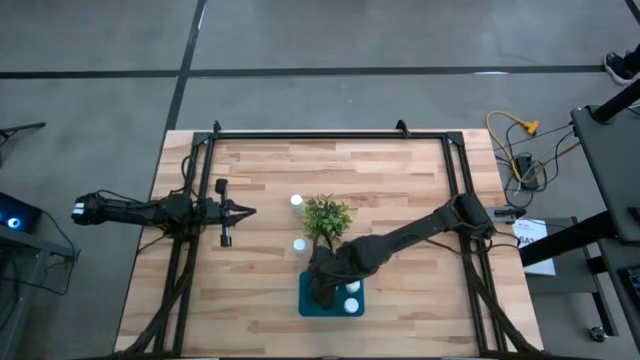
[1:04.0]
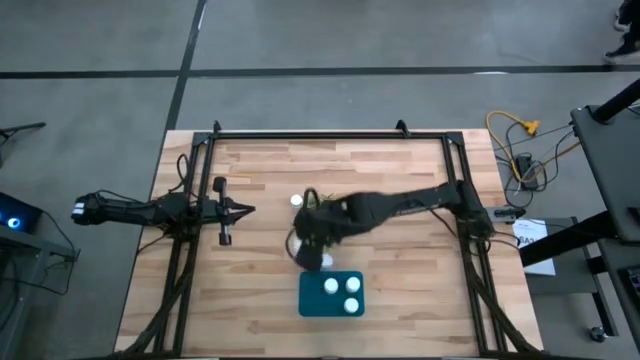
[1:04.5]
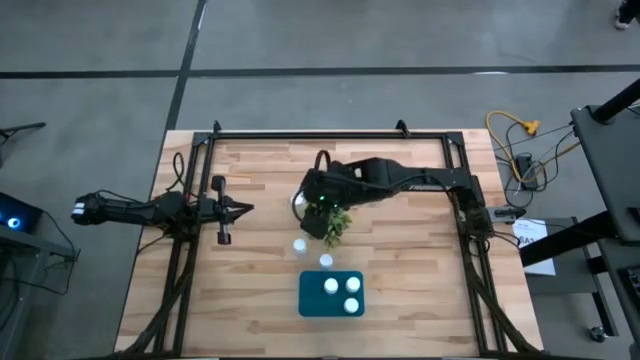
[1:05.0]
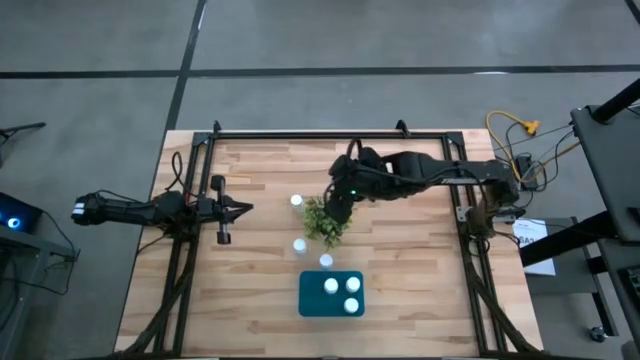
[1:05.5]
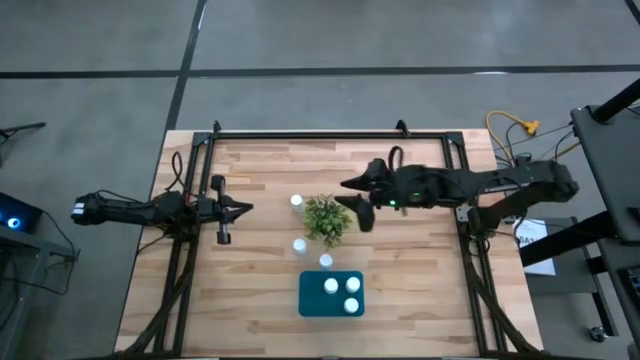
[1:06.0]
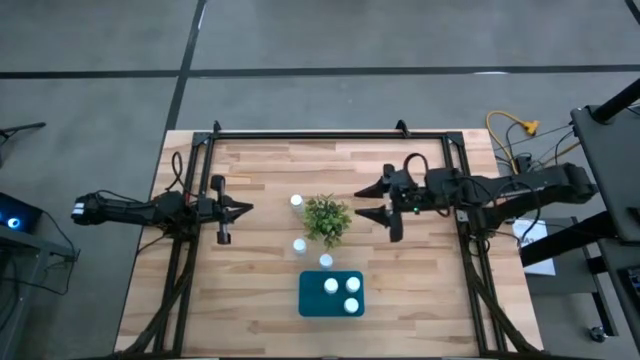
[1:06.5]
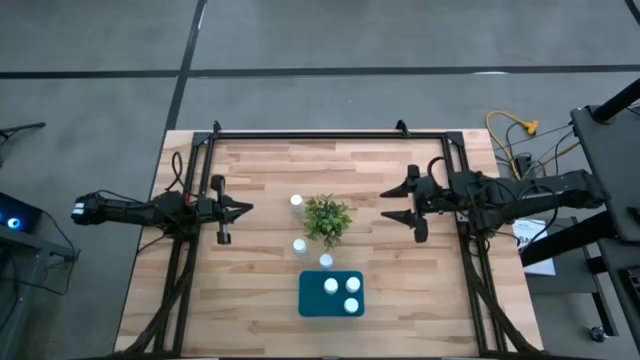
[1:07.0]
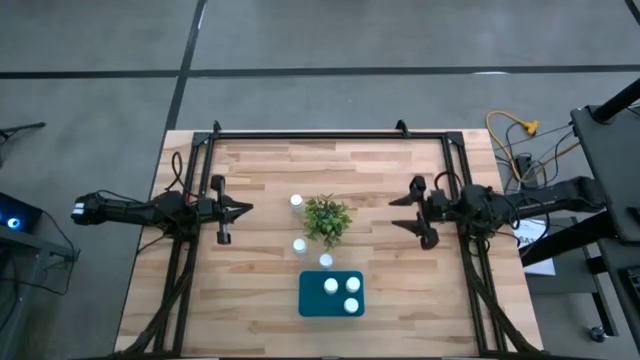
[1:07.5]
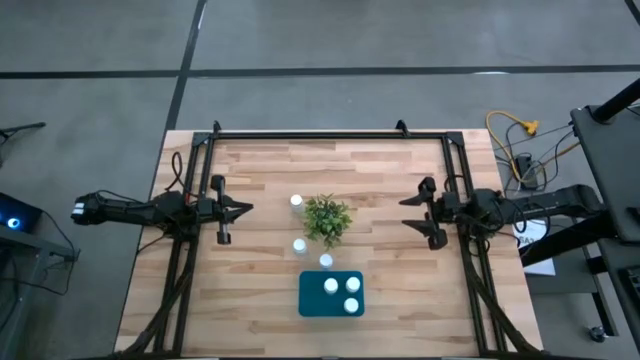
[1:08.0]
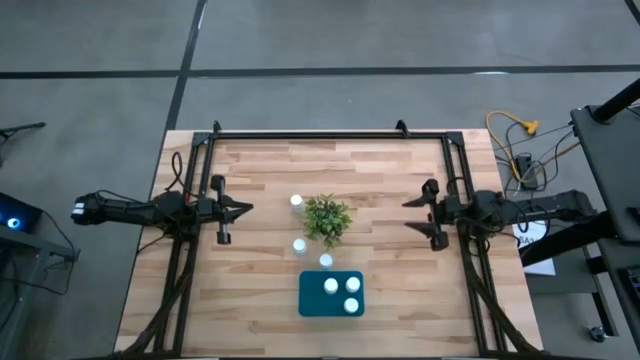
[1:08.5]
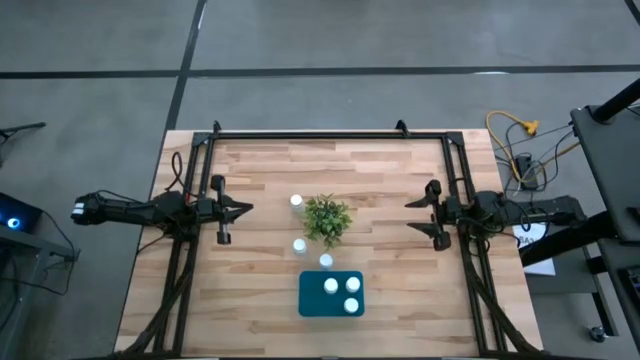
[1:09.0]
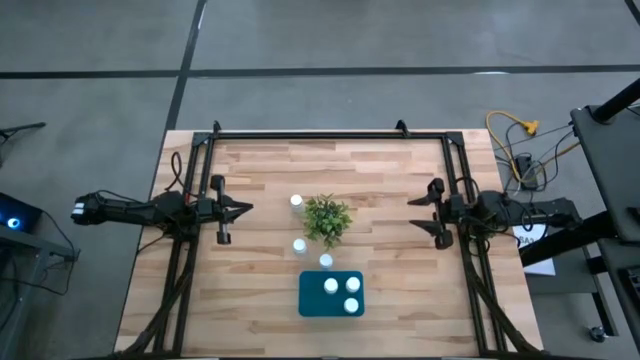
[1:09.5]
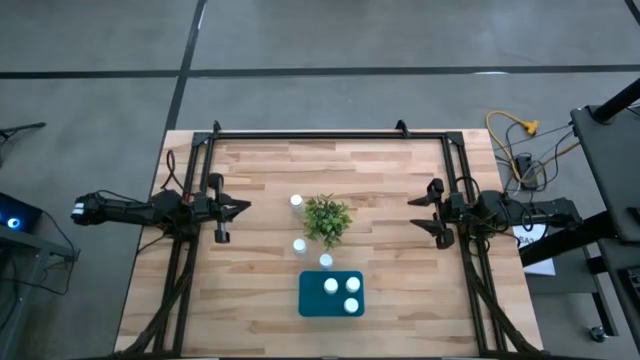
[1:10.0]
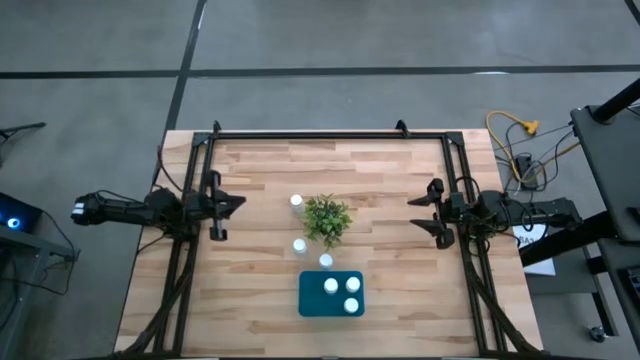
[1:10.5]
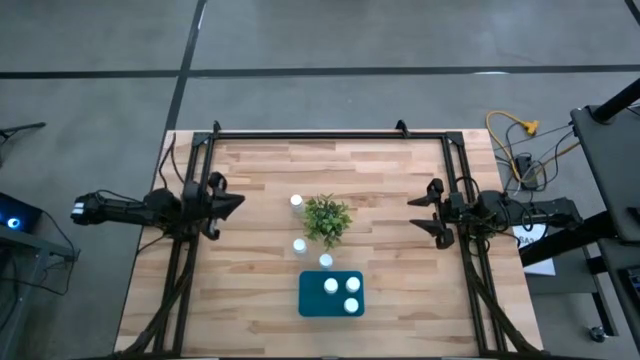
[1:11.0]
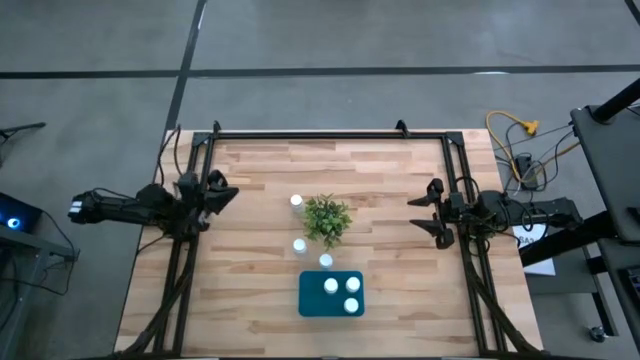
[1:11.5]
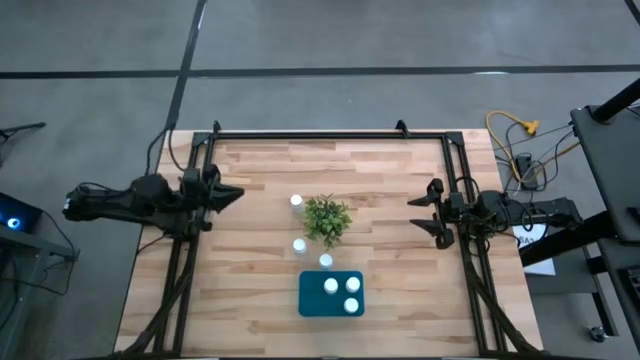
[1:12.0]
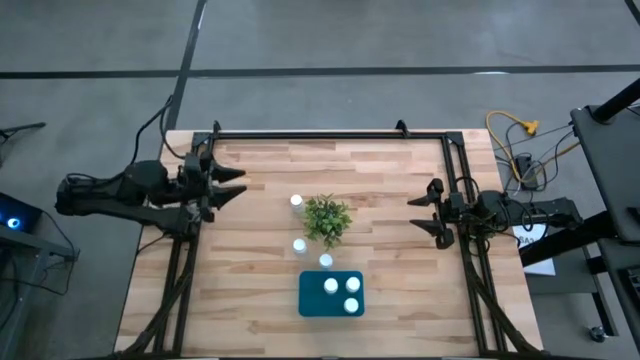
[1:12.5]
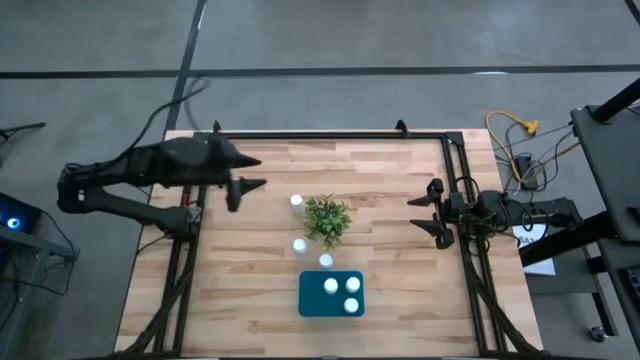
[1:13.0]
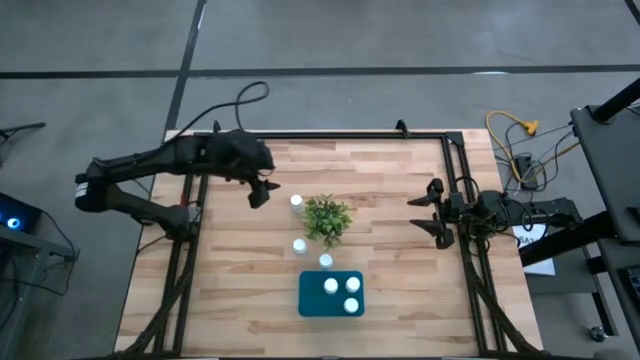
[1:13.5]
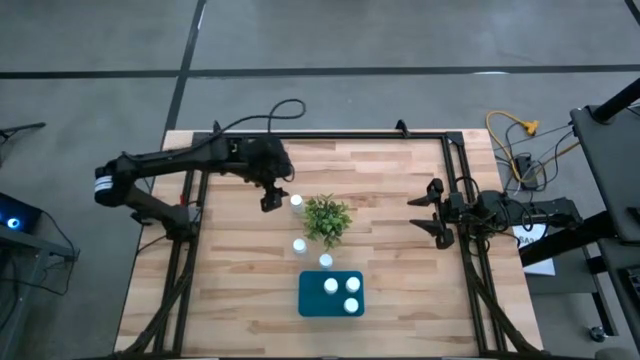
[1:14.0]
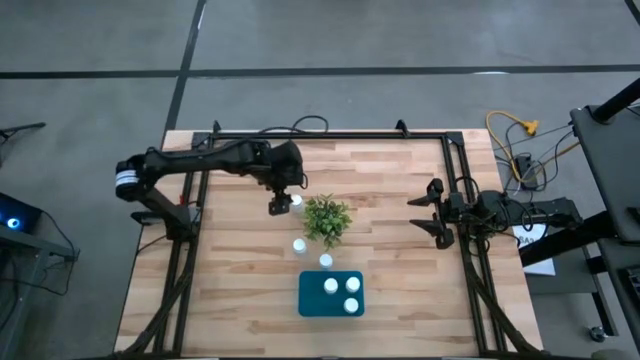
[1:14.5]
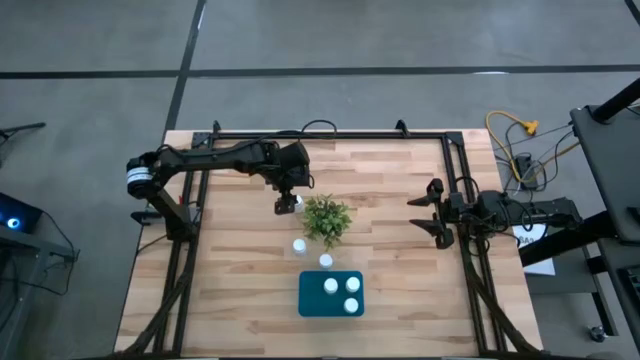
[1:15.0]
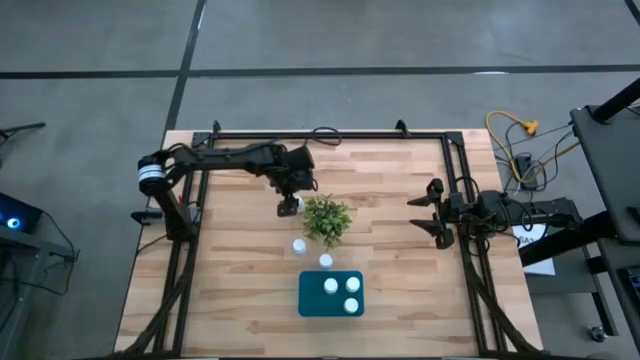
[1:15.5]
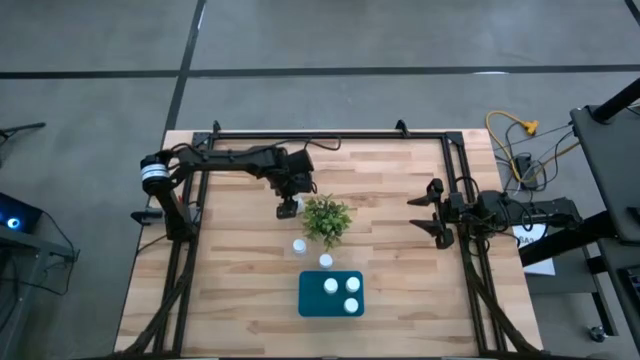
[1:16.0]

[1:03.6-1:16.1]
Task: Pick and place pill bottles into a basket
Put the white medicine bottle into the blue bin

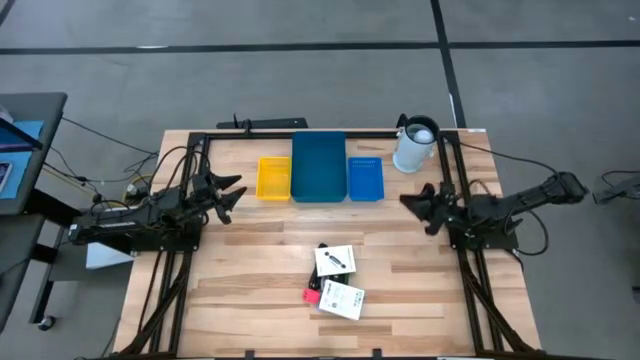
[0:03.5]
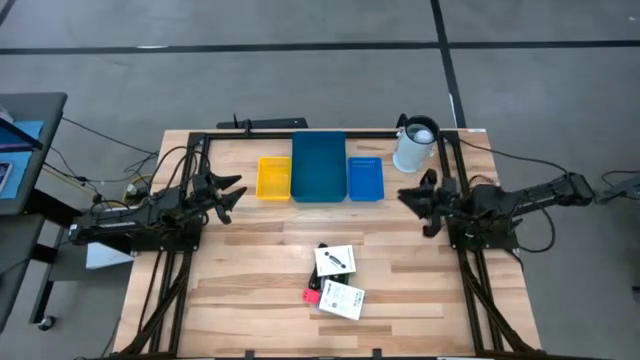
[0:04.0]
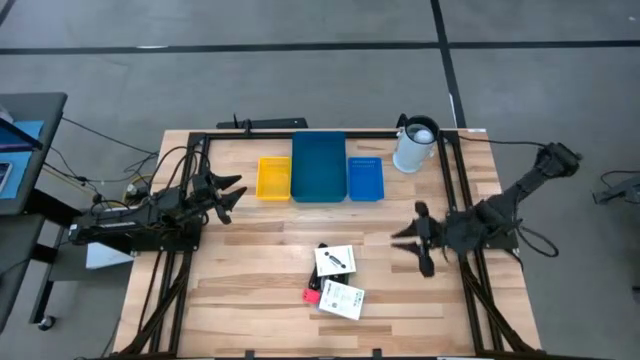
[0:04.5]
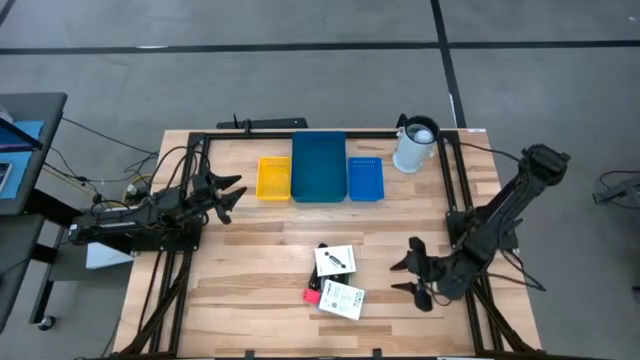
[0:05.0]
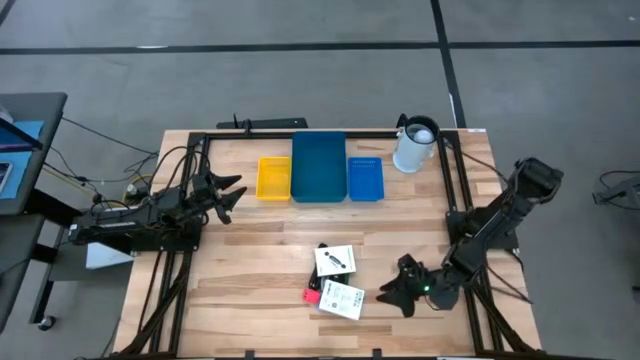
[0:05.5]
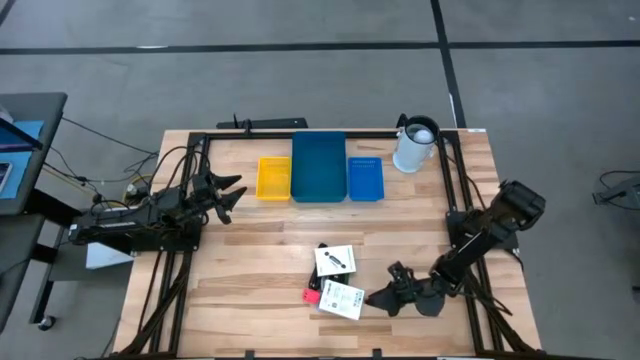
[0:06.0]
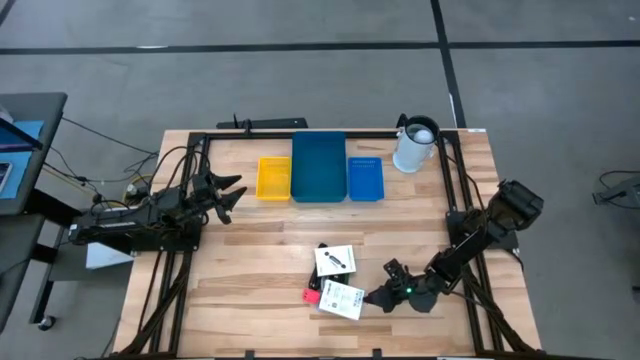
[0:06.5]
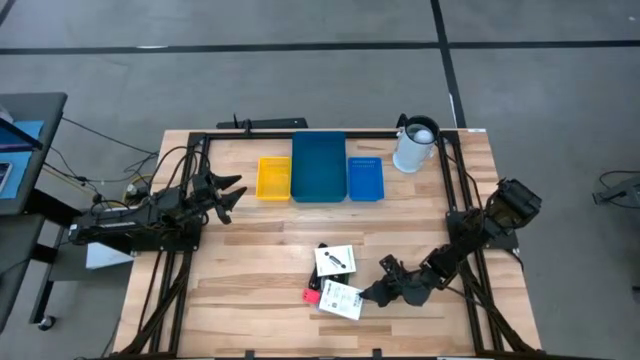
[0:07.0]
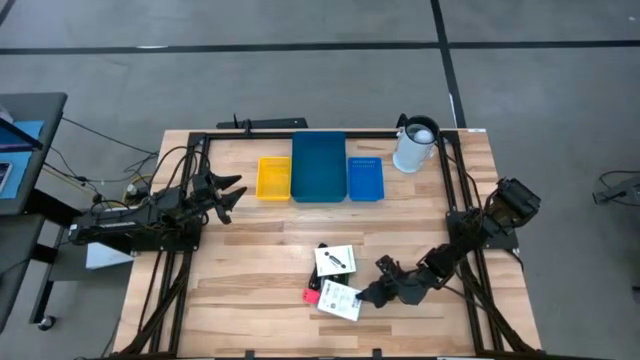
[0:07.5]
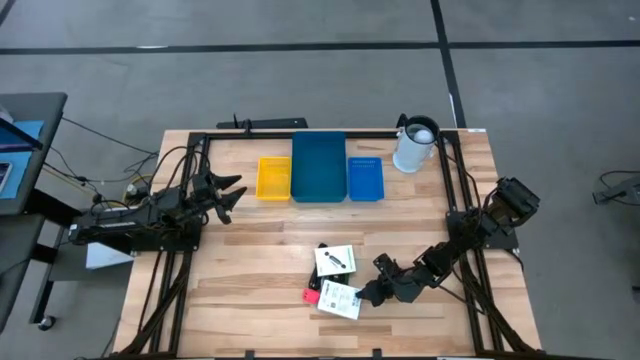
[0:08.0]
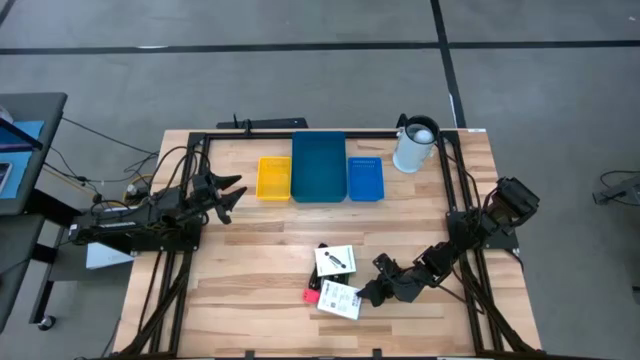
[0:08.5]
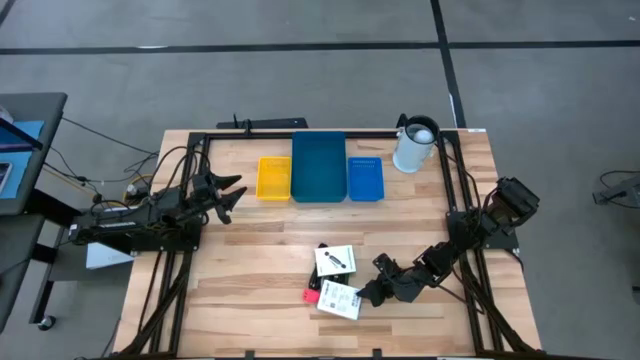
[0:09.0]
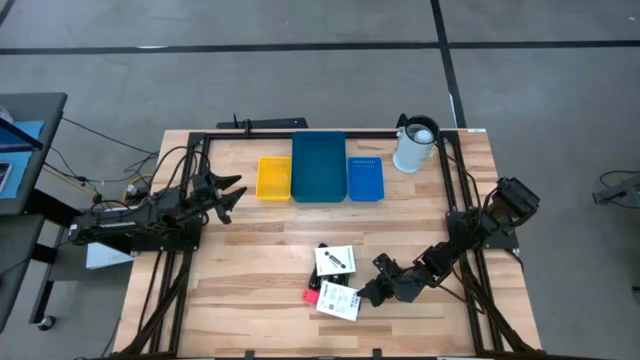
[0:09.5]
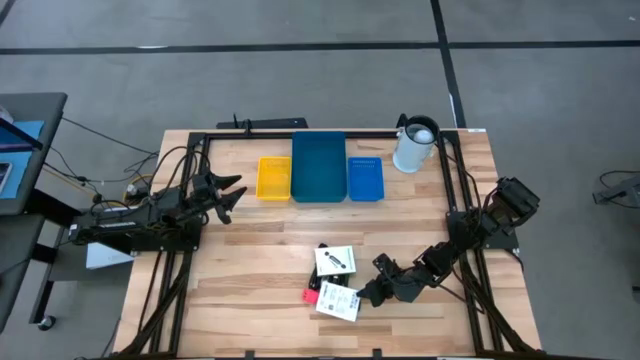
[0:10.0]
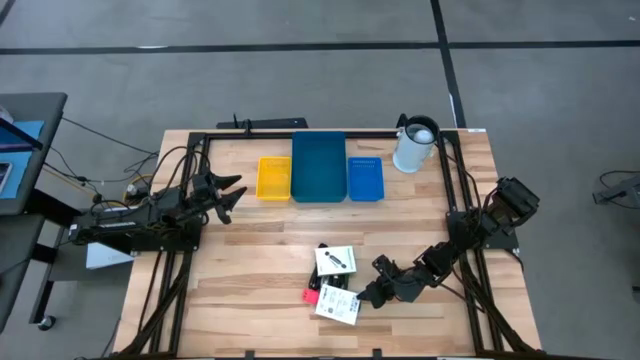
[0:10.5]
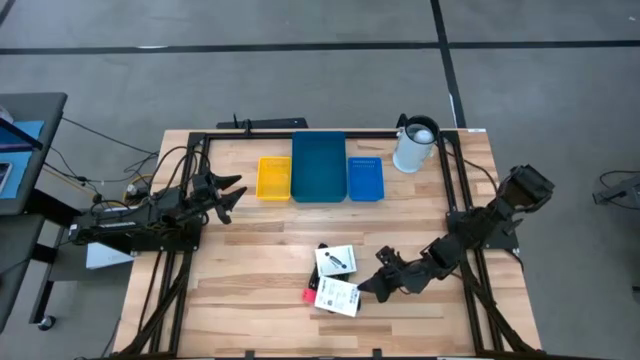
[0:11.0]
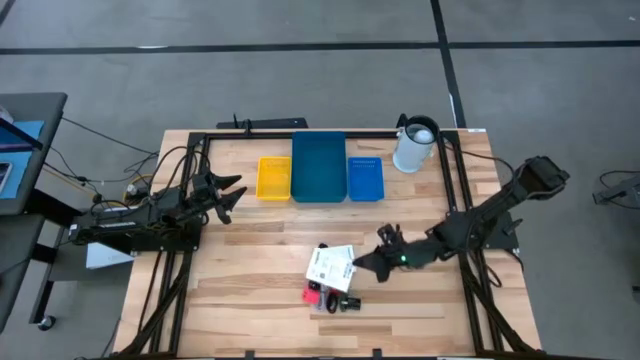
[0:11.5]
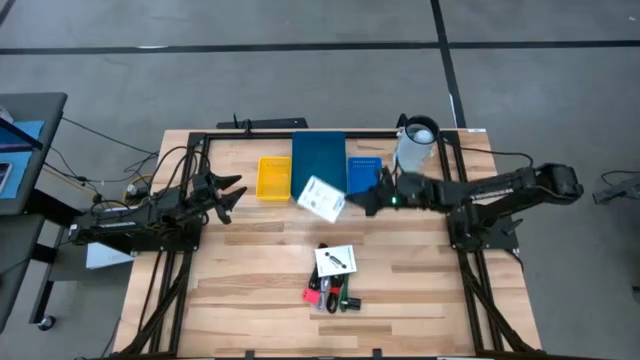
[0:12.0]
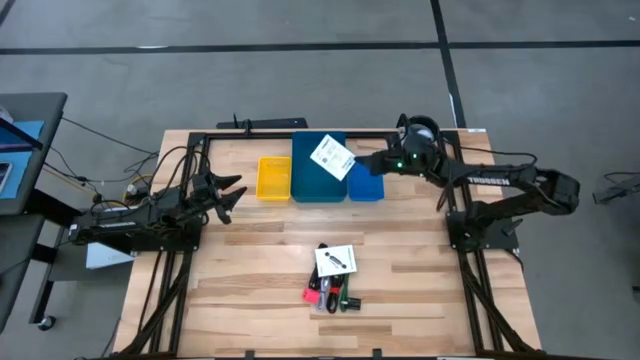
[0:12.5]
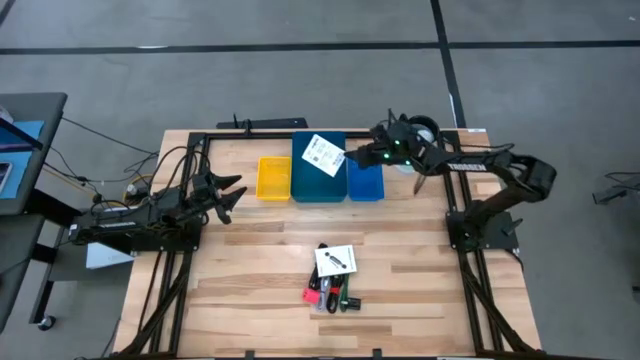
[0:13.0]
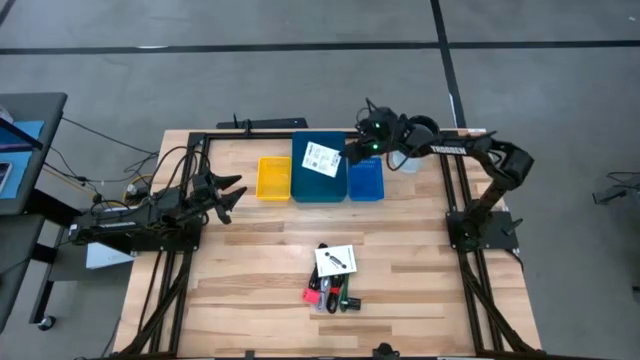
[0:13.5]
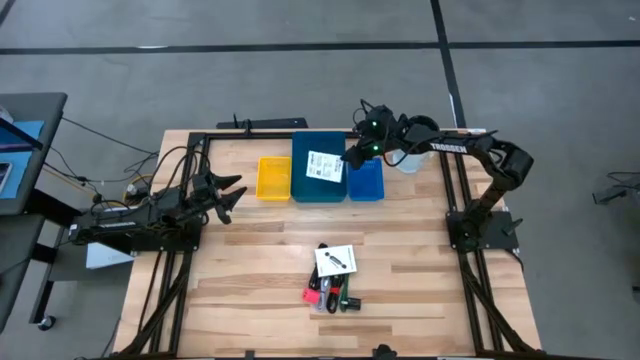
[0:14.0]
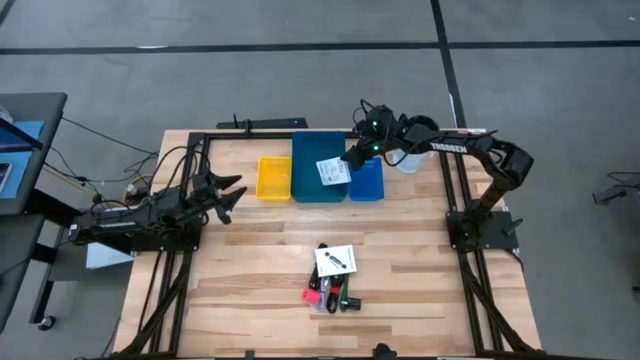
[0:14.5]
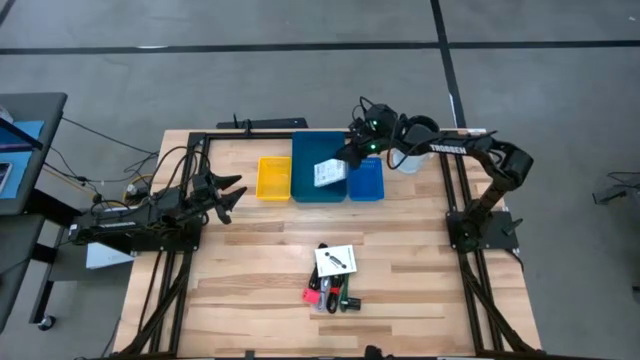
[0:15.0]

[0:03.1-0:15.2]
Task: Pick and place items into bin
Put the bottom white box into the dark blue bin
